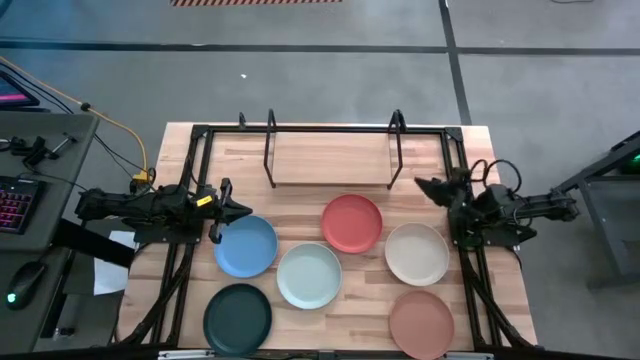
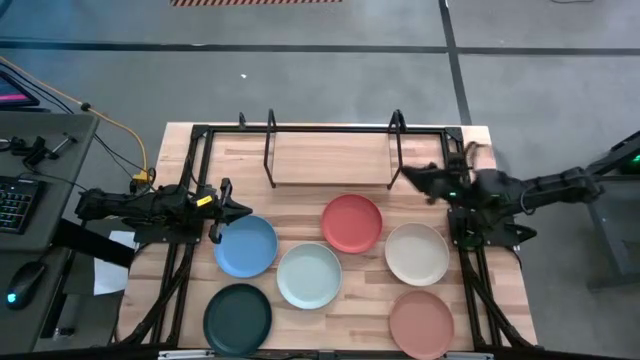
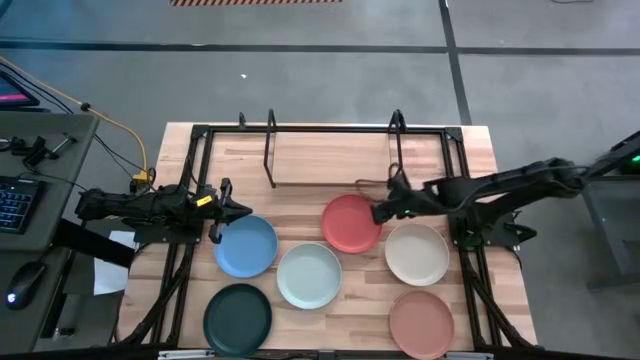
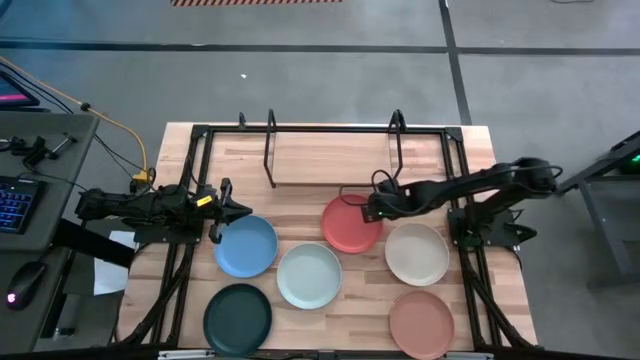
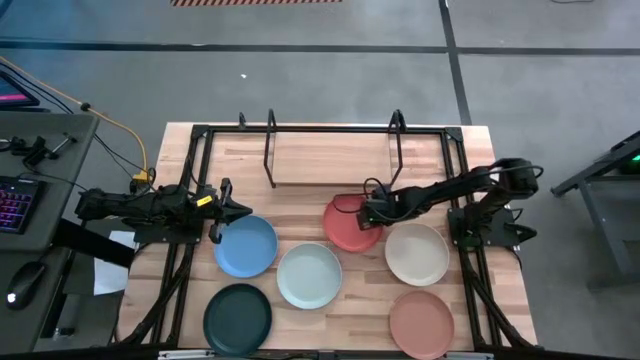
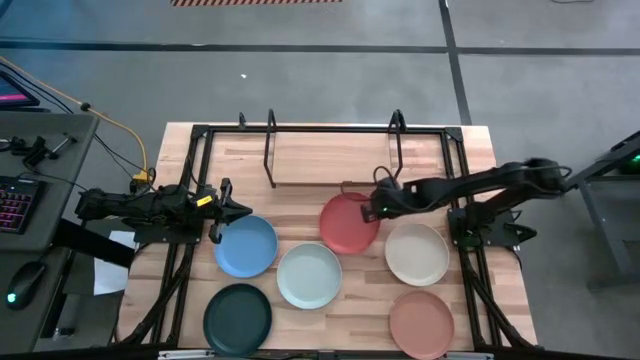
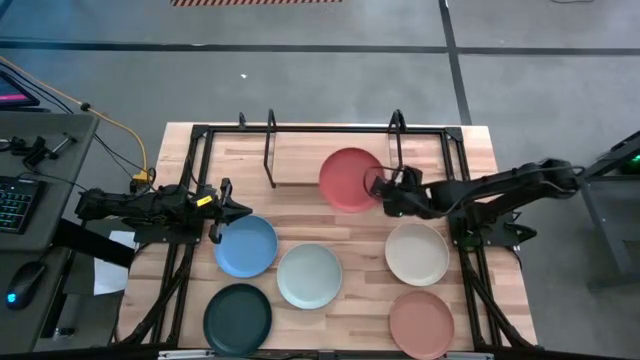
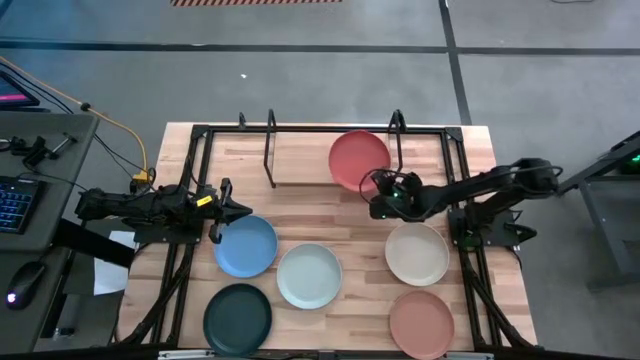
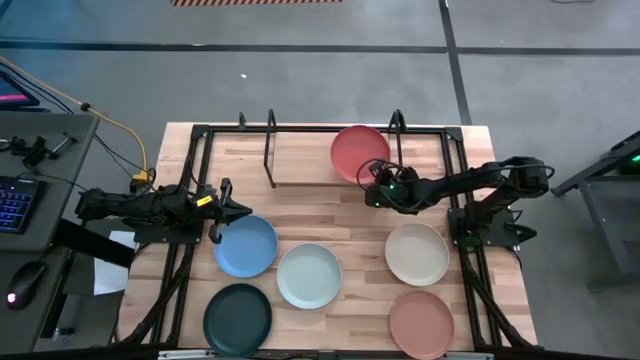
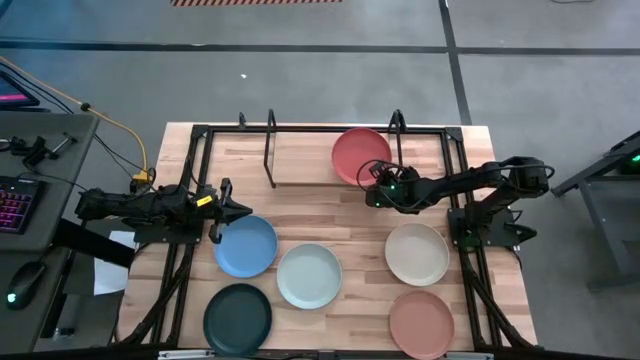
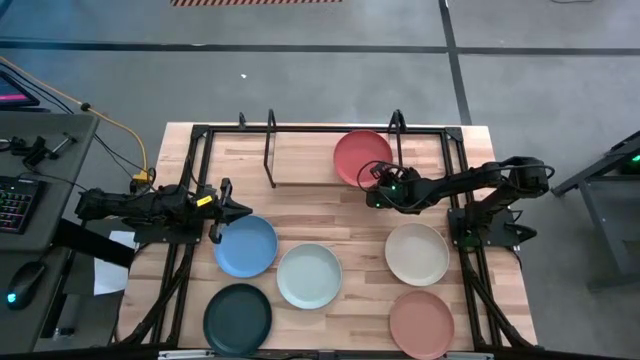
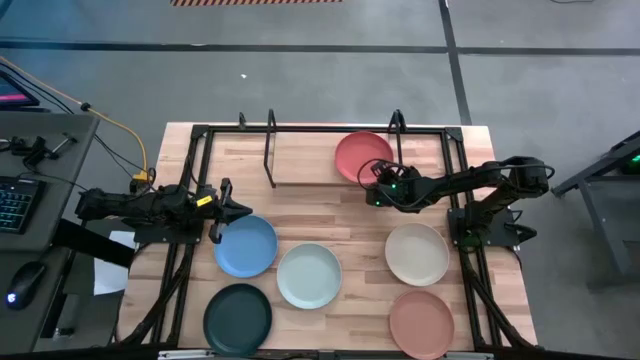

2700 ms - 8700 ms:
Task: Place and stack plates onto a shelf
Put the orange plate on the shelf

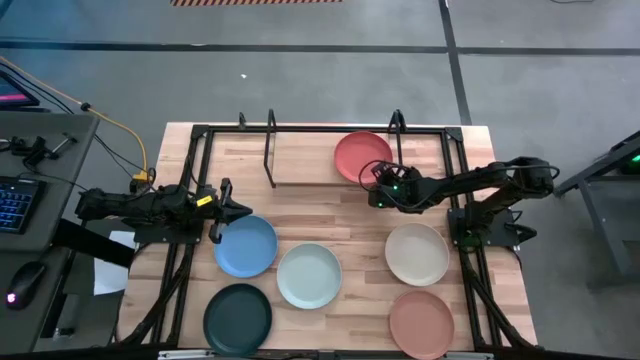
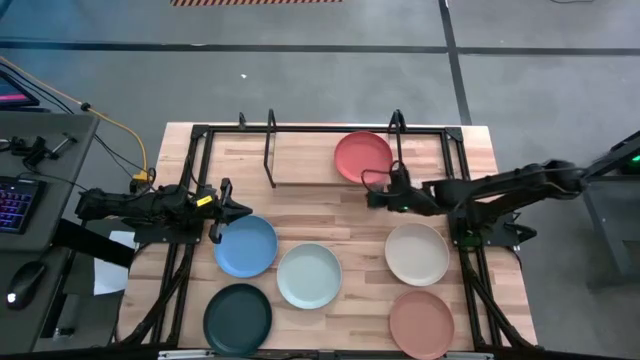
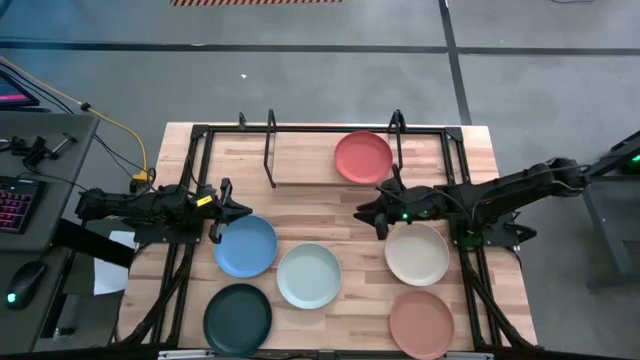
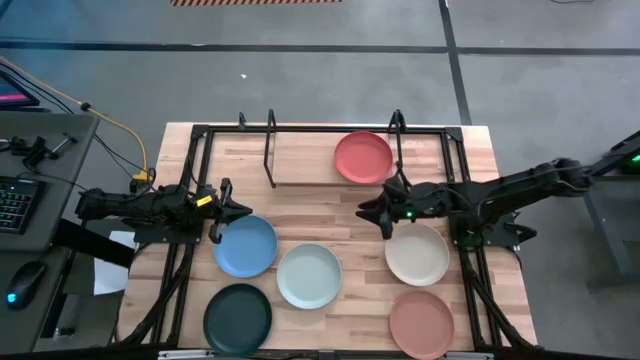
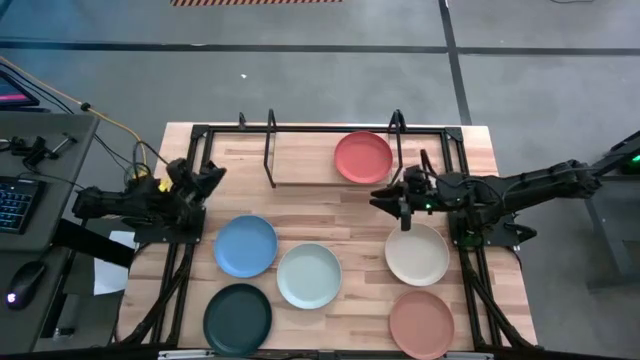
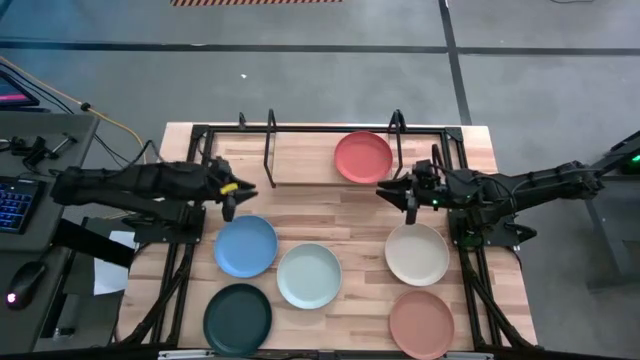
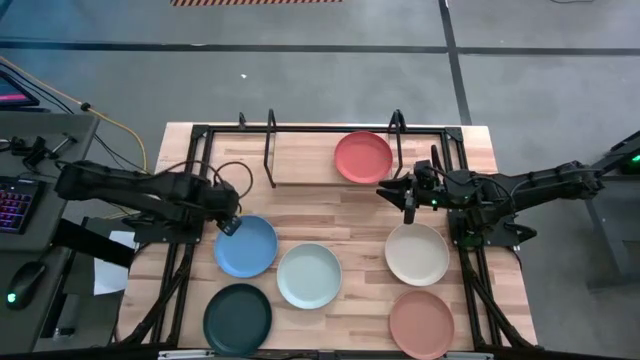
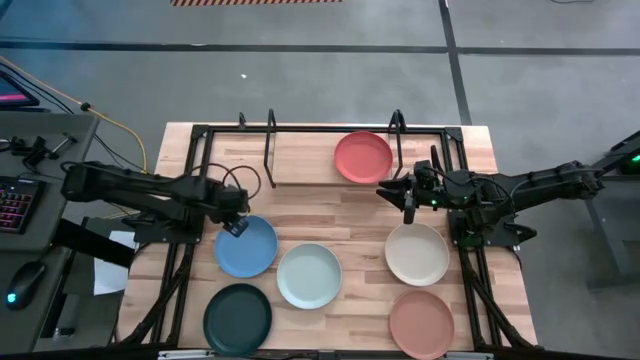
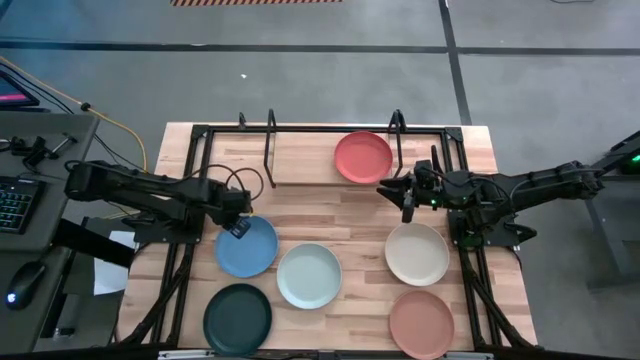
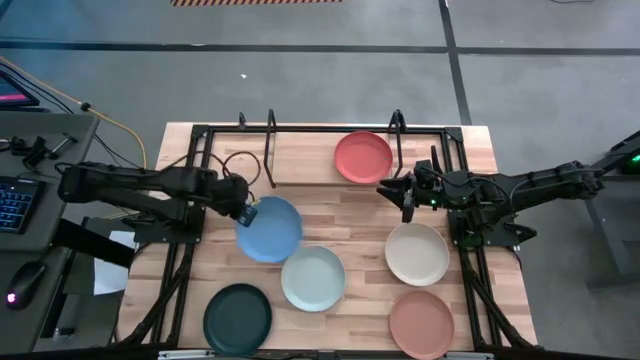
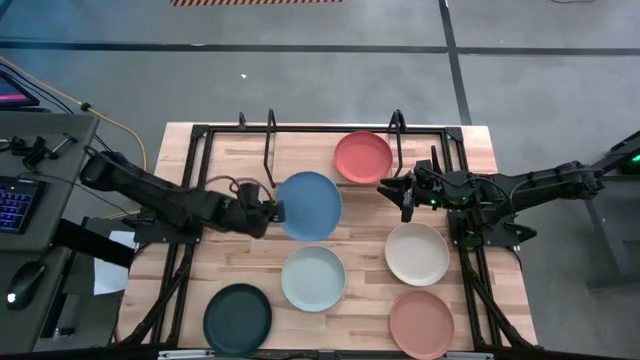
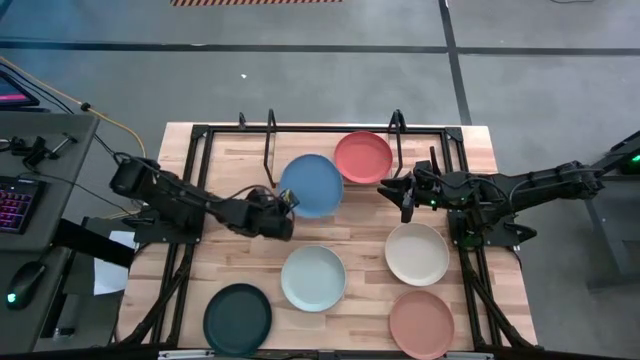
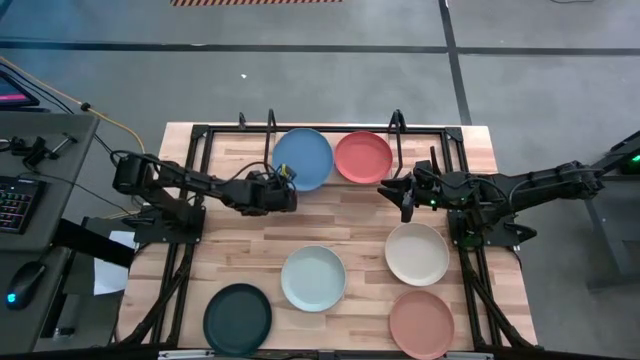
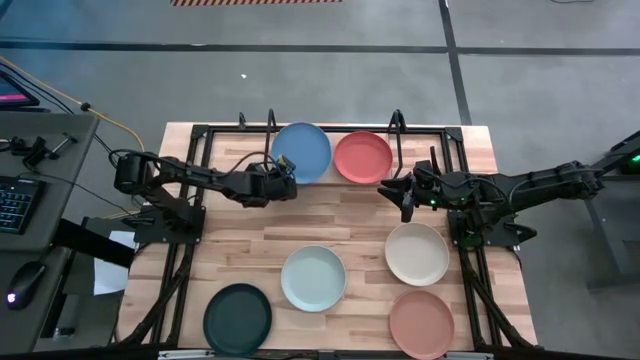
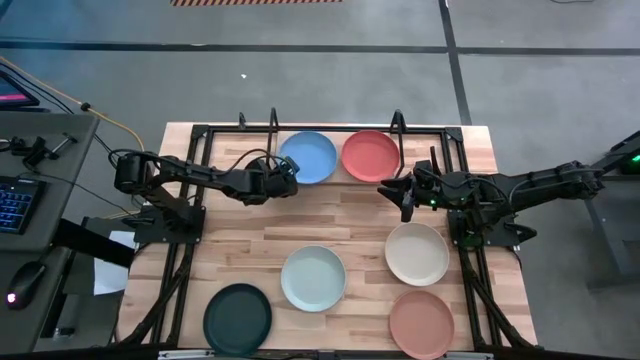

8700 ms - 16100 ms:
Put the blue plate on the shelf

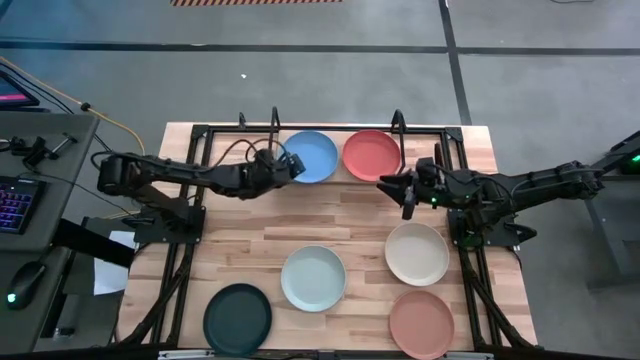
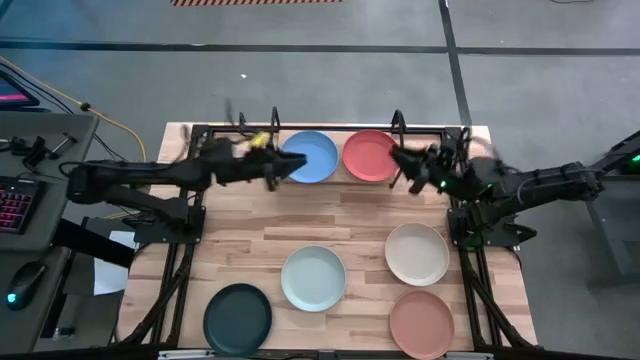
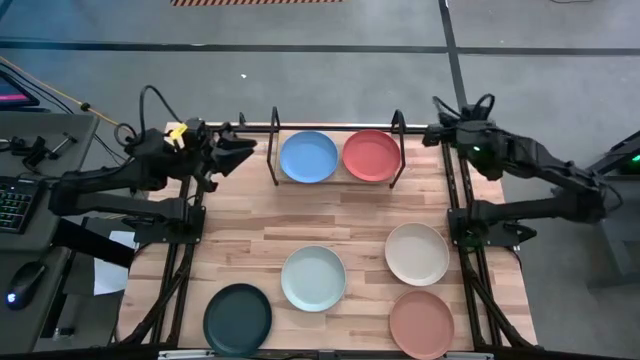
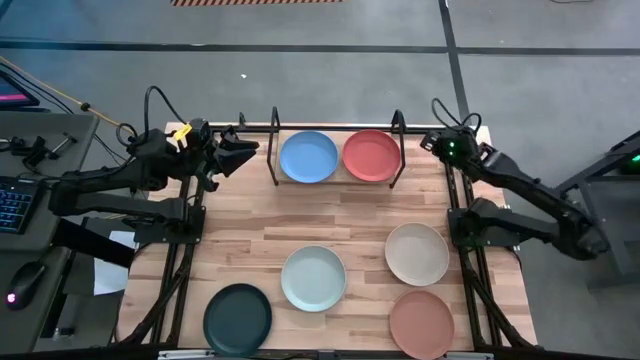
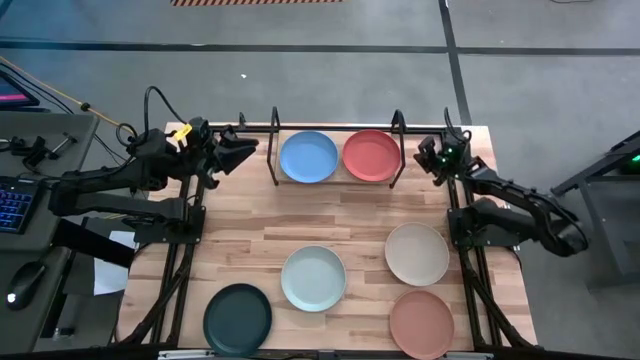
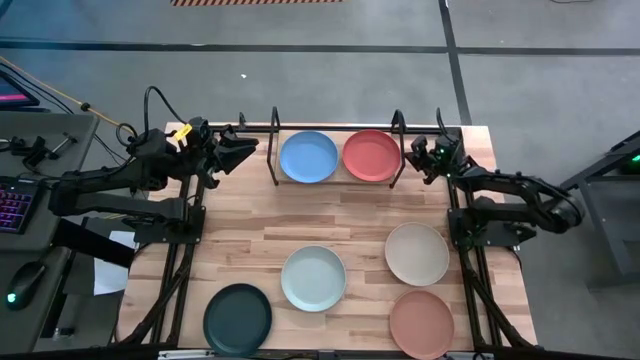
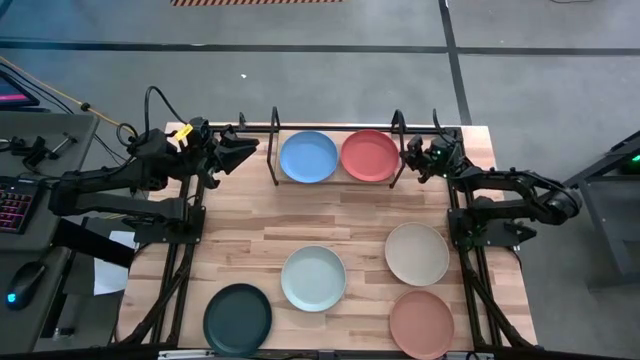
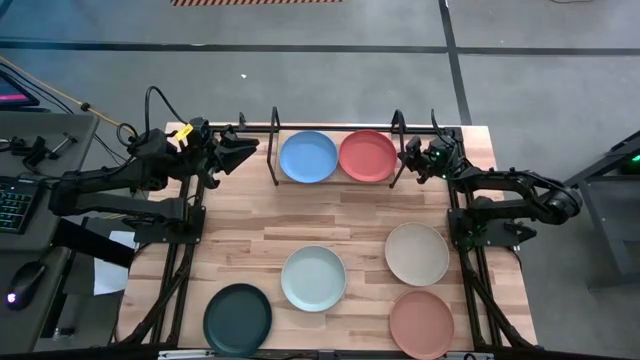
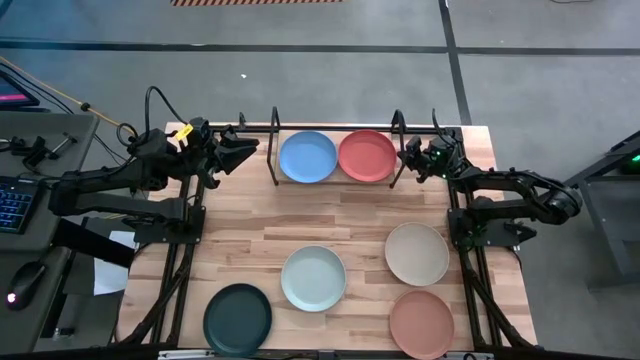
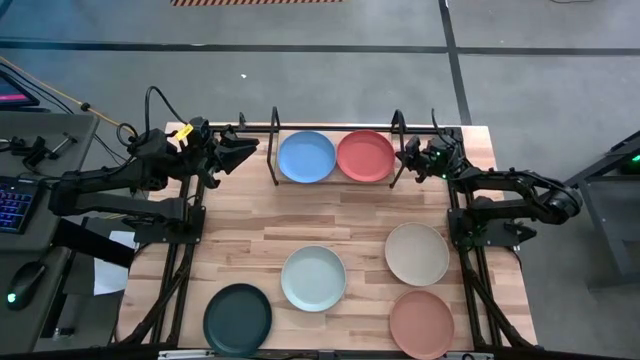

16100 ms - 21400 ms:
Adjust the orange plate on the shelf

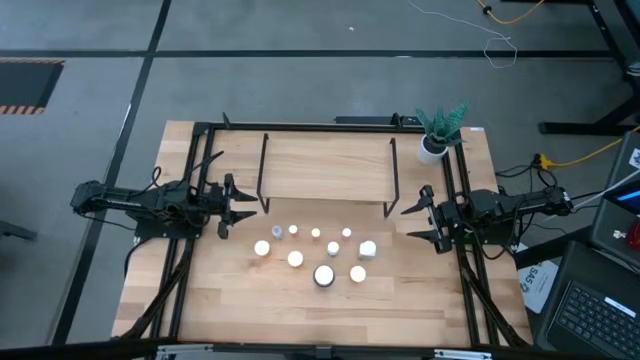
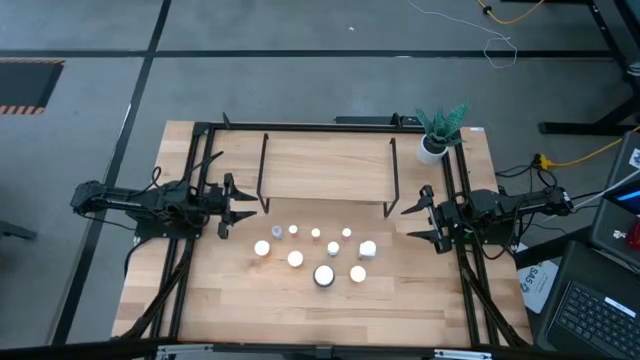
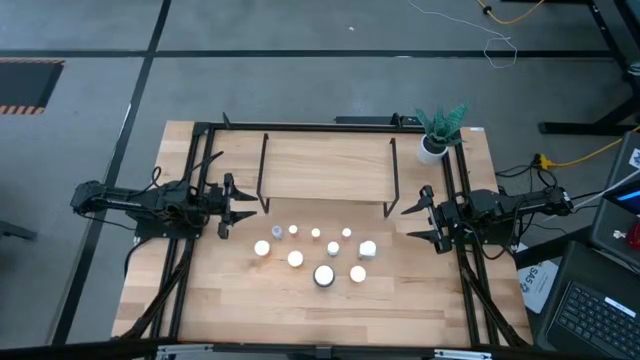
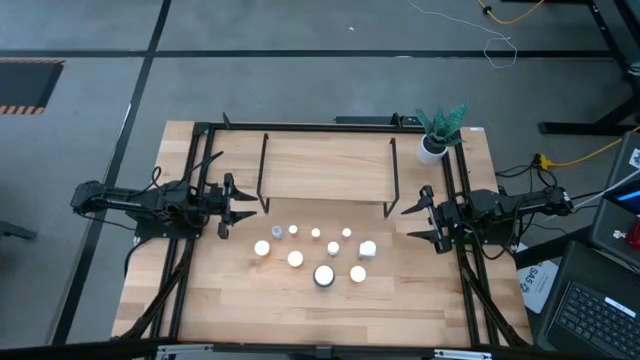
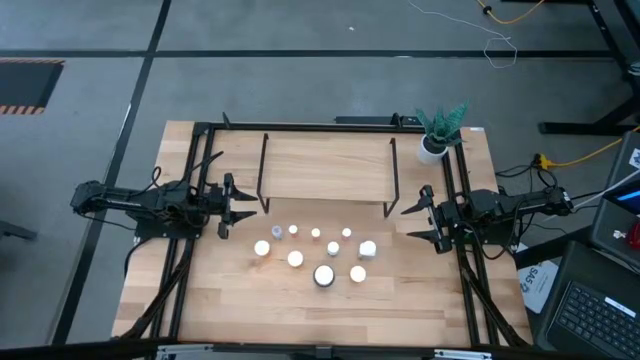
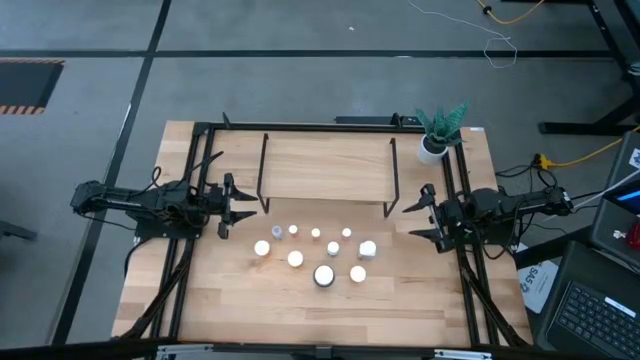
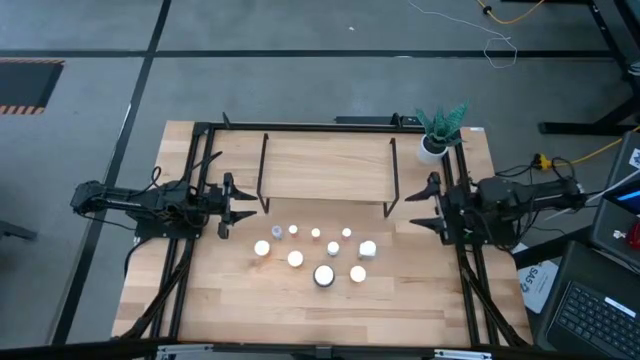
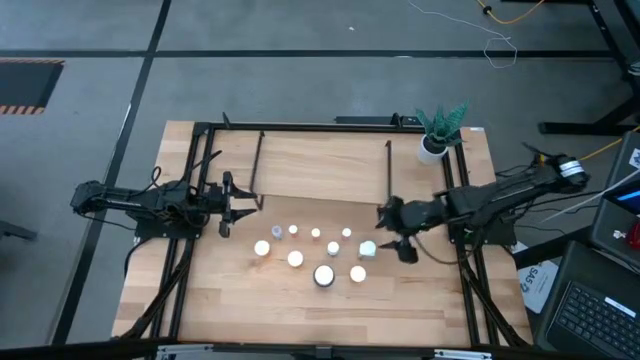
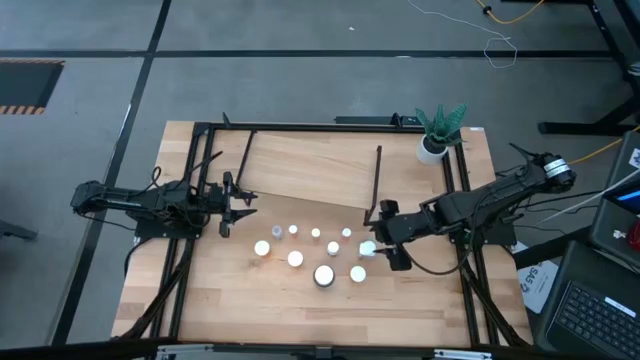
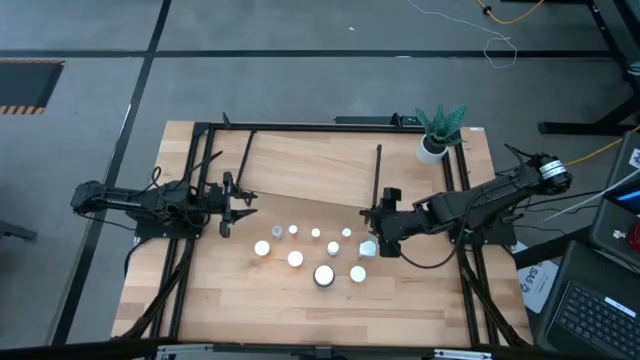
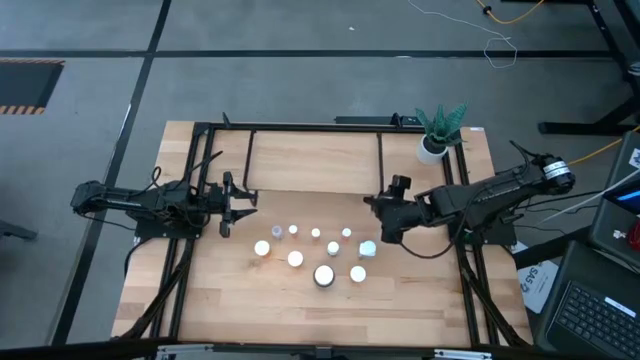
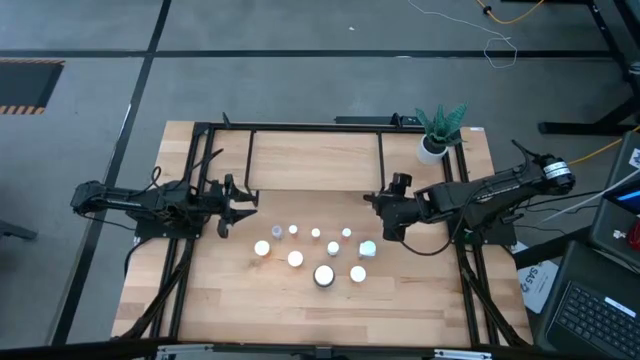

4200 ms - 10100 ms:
Task: Pick and place medicine bottles onto shelf by color
Adjust the shelf
